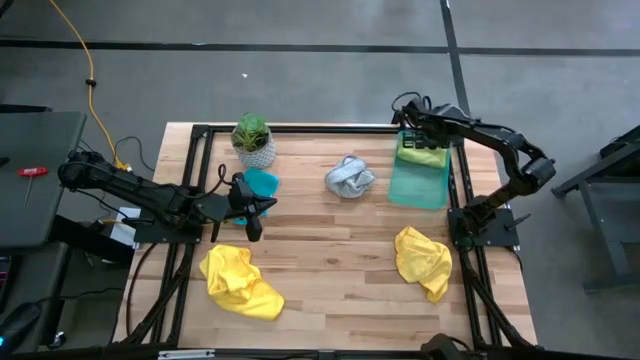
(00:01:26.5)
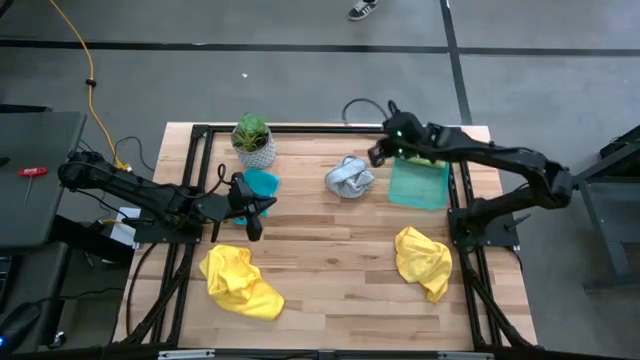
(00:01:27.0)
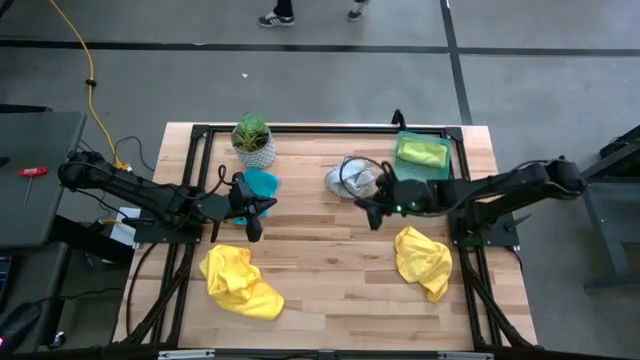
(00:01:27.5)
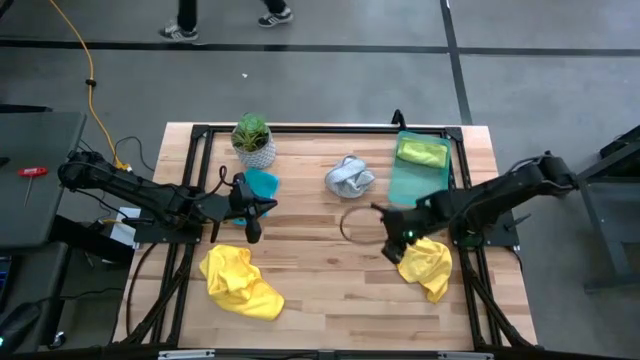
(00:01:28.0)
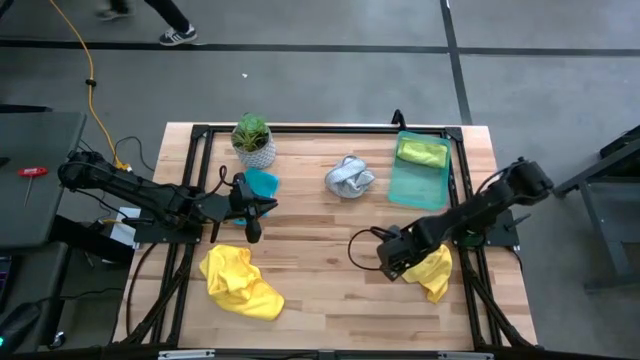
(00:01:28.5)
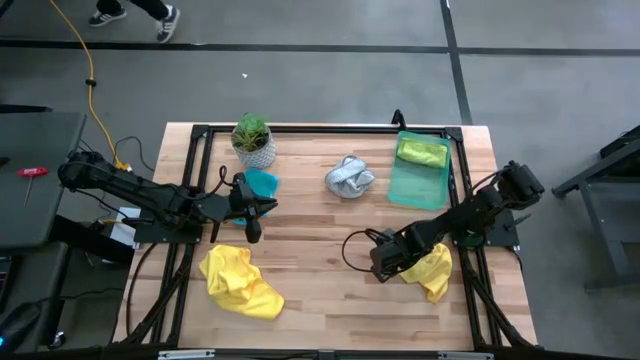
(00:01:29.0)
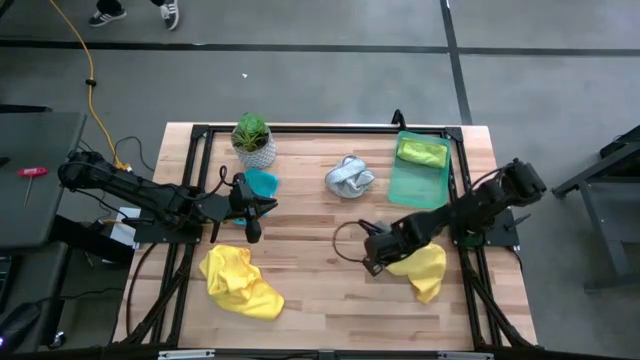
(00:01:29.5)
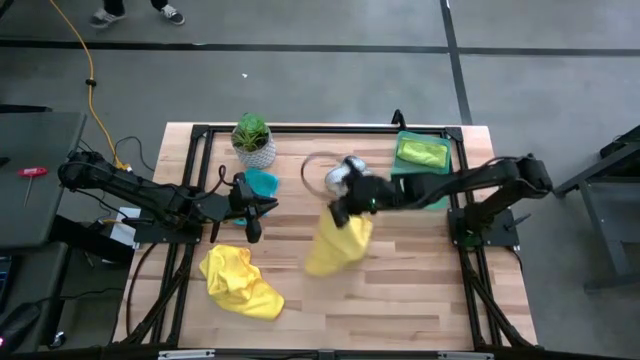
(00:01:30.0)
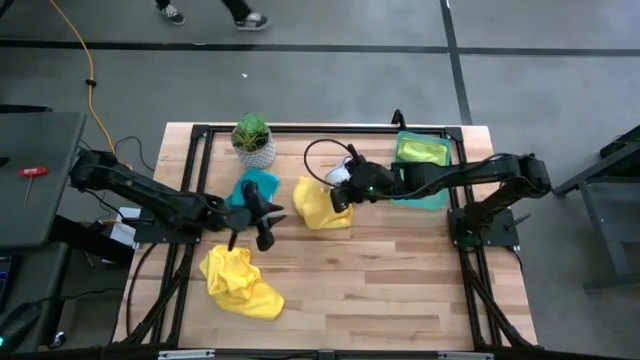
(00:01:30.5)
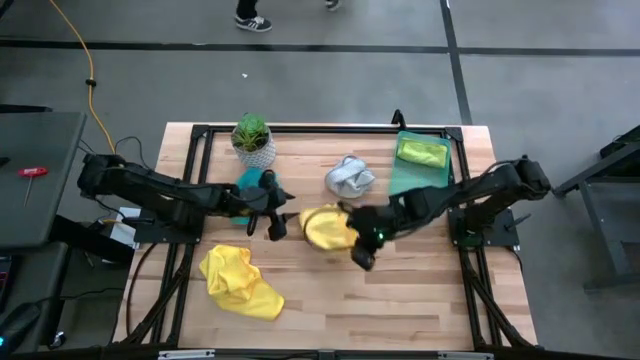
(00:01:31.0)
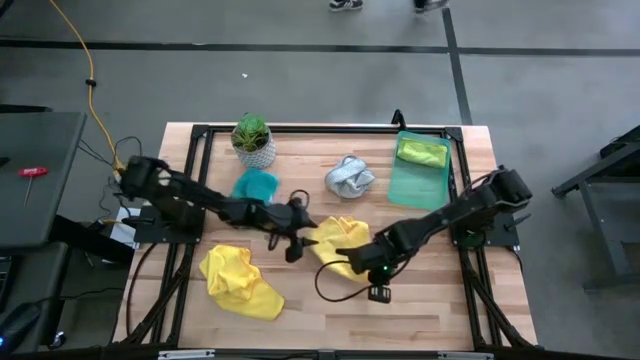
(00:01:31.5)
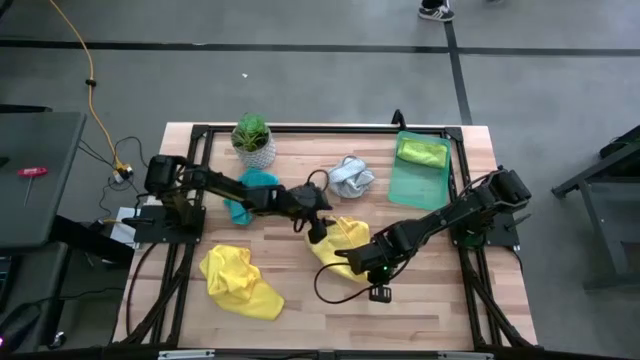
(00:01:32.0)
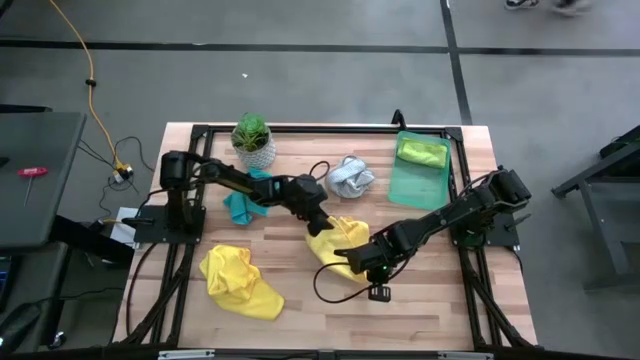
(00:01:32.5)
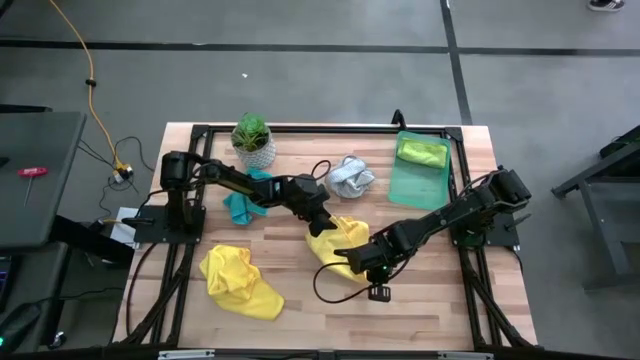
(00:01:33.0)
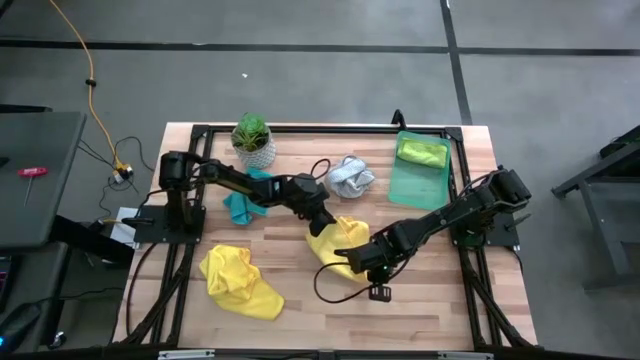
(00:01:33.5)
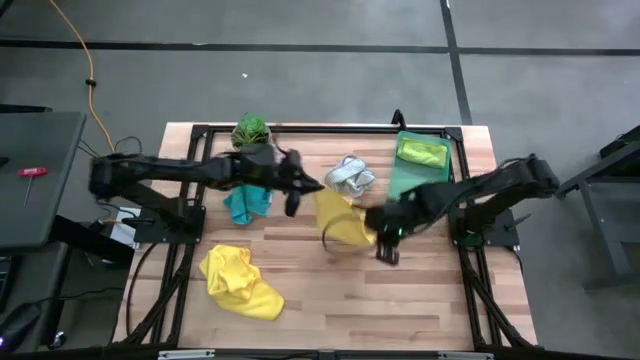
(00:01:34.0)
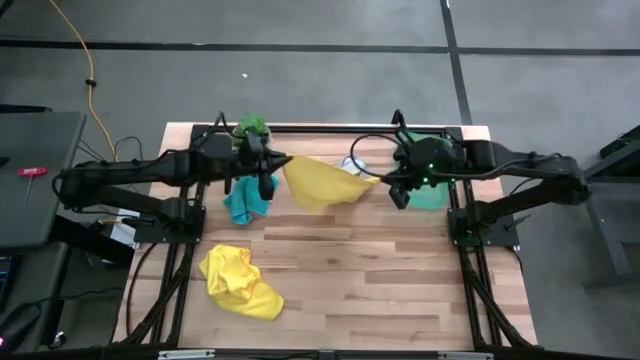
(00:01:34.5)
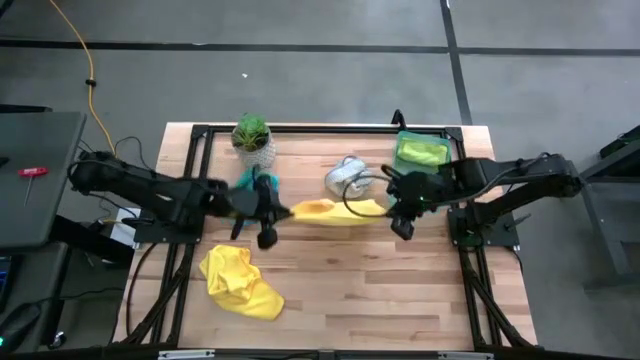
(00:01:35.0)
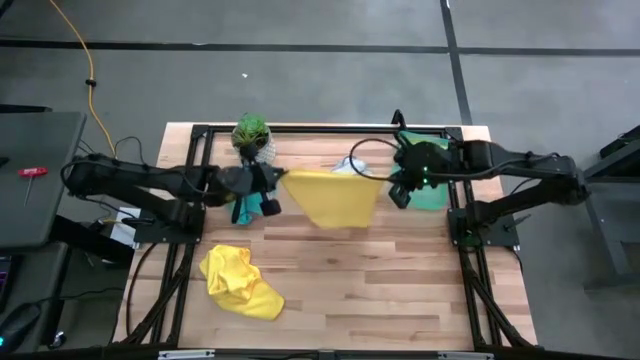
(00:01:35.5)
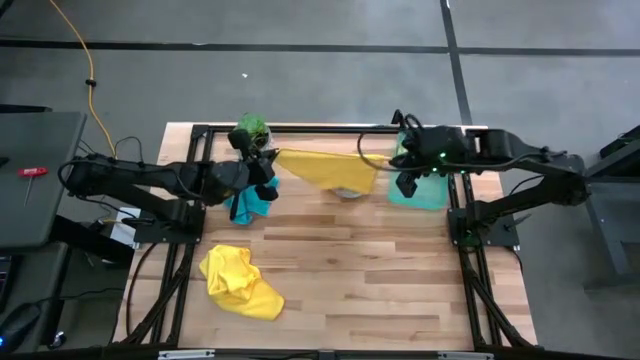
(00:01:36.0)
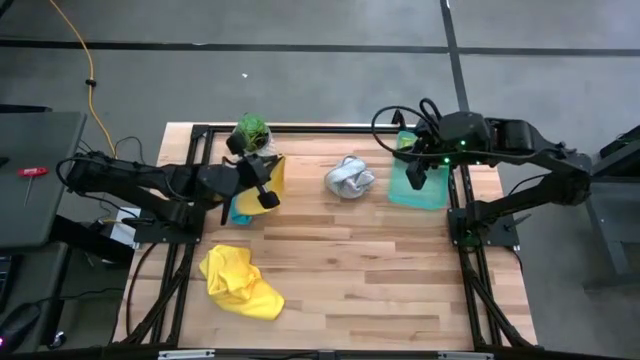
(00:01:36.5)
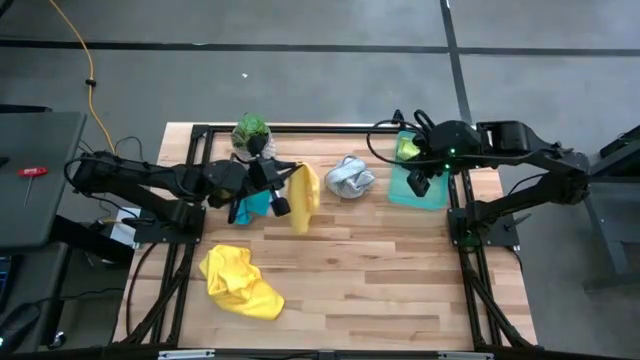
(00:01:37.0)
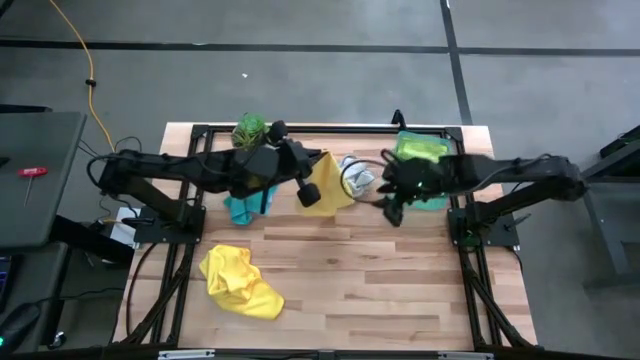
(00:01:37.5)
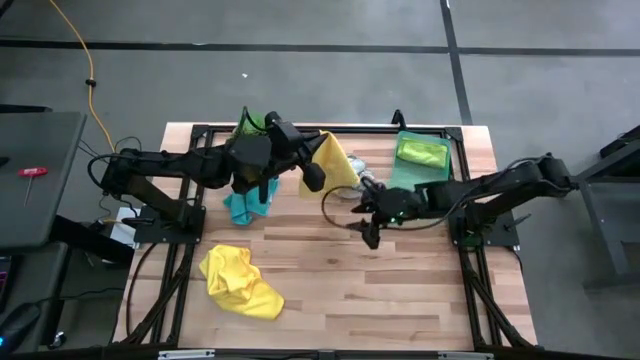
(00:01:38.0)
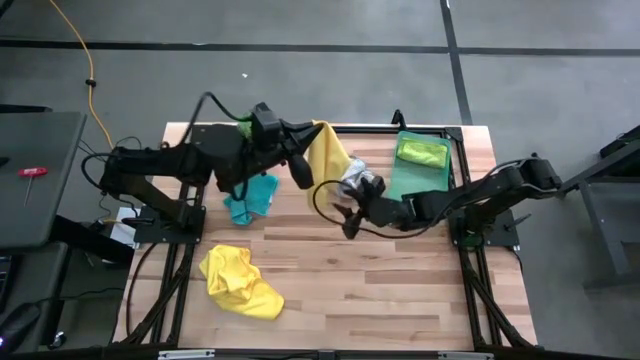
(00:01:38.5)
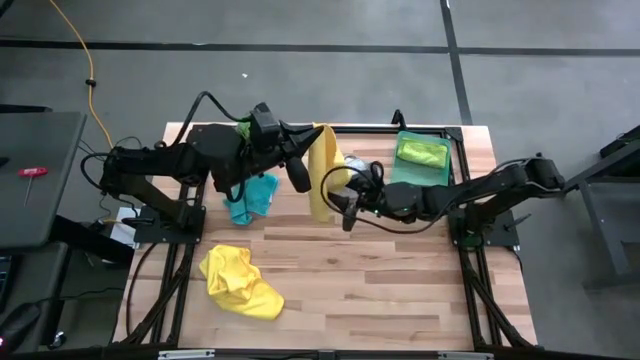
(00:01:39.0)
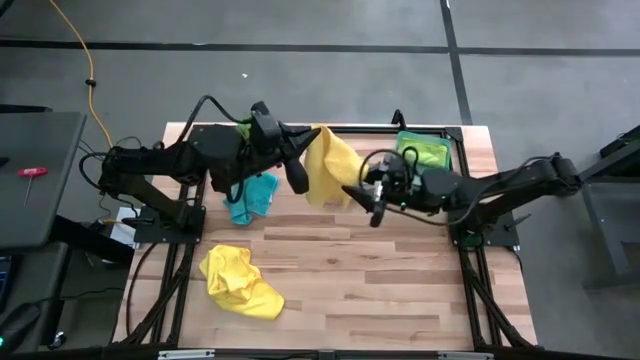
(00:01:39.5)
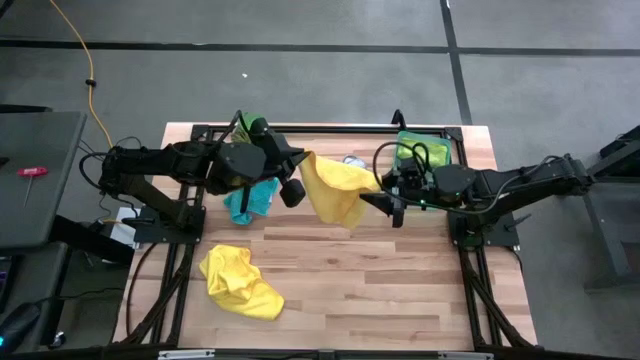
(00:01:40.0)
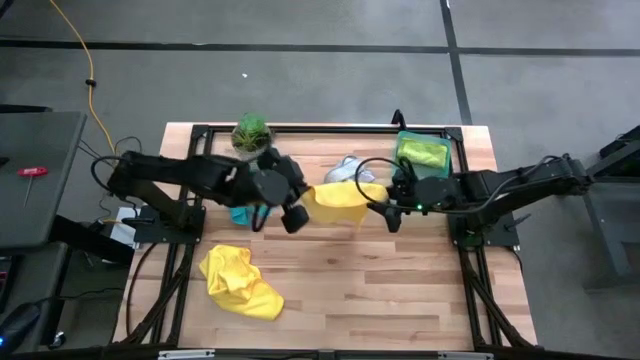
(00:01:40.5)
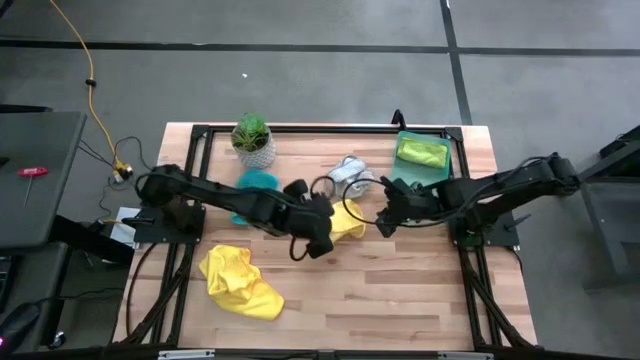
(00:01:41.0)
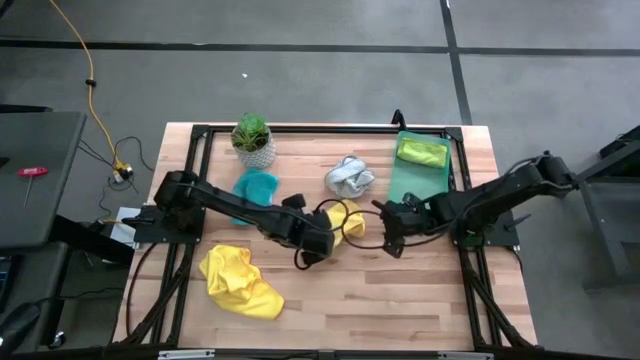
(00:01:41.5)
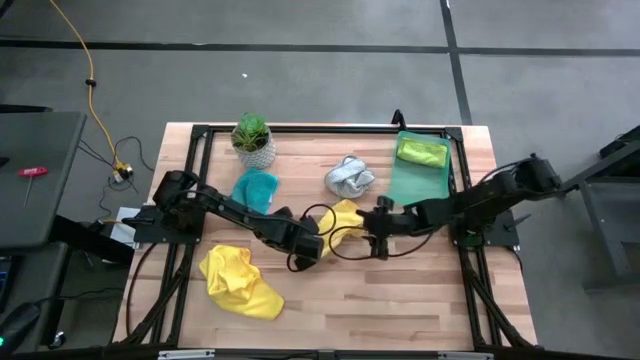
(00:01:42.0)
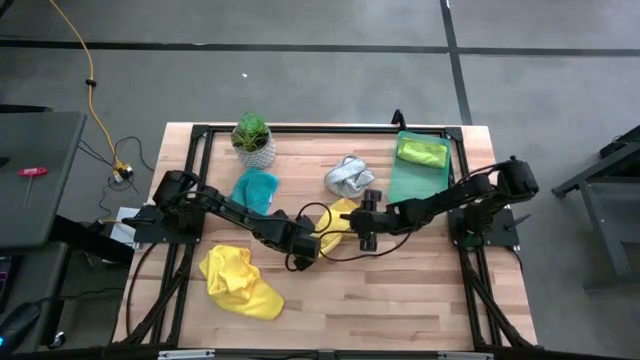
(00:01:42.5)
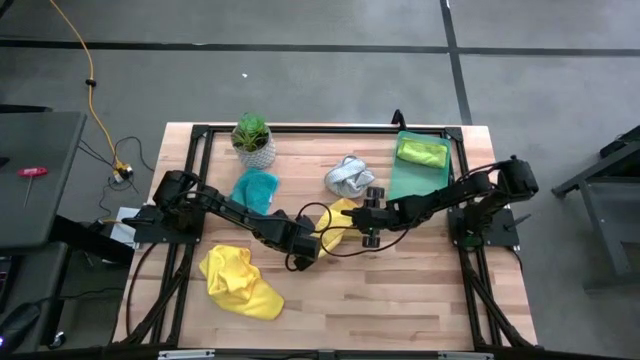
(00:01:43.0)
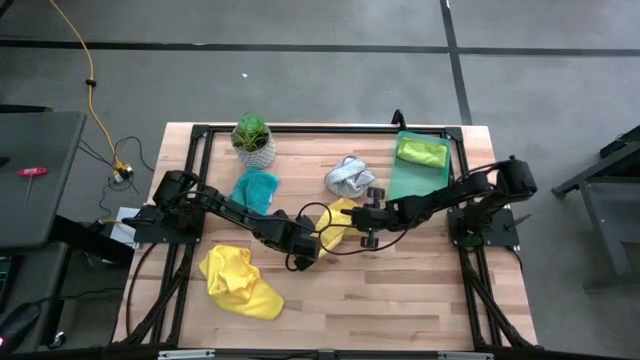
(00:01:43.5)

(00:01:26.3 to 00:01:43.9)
Task: Fold microfiber towels
Fold the right yellow microfiber cloth
